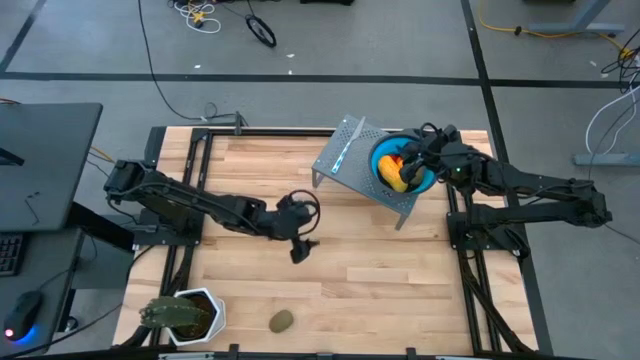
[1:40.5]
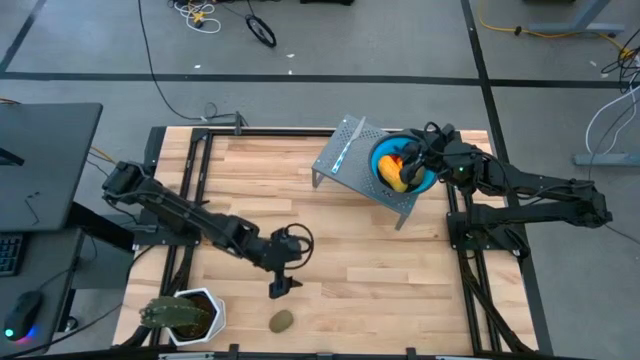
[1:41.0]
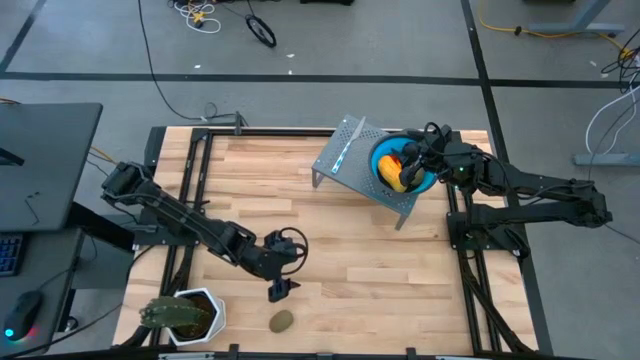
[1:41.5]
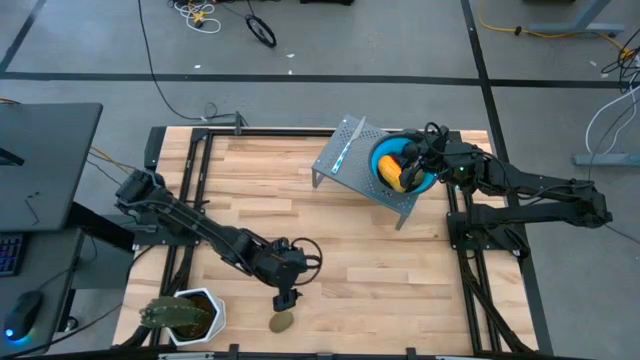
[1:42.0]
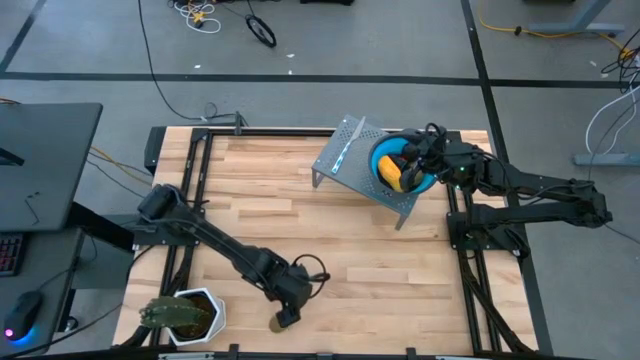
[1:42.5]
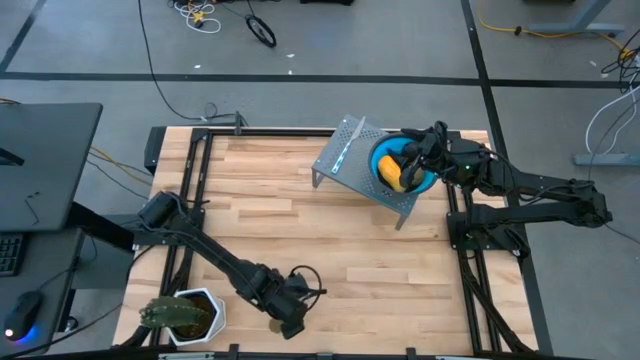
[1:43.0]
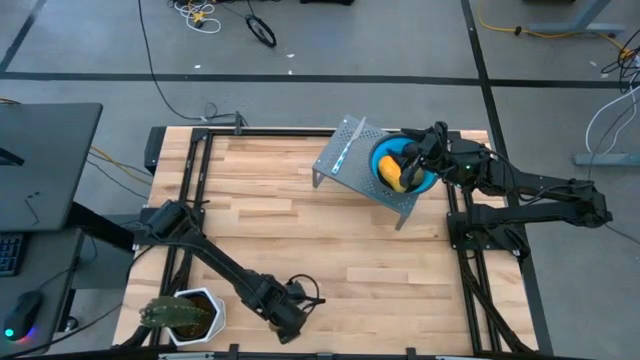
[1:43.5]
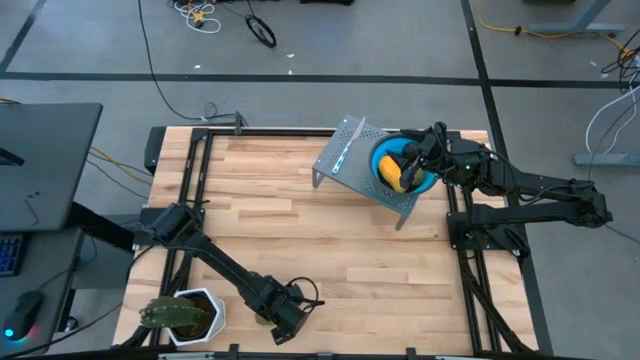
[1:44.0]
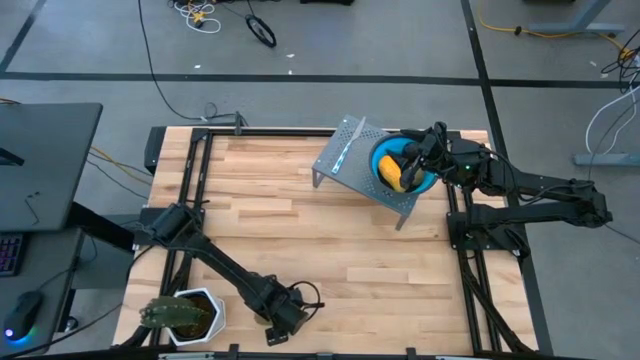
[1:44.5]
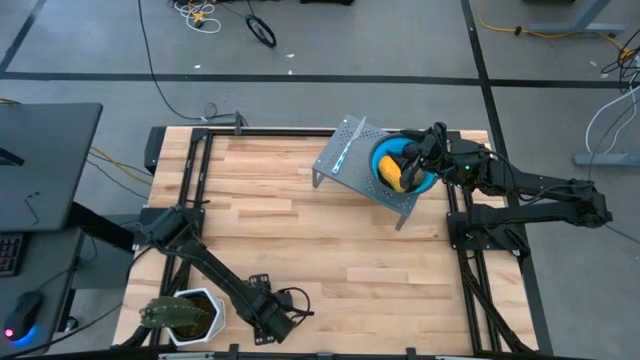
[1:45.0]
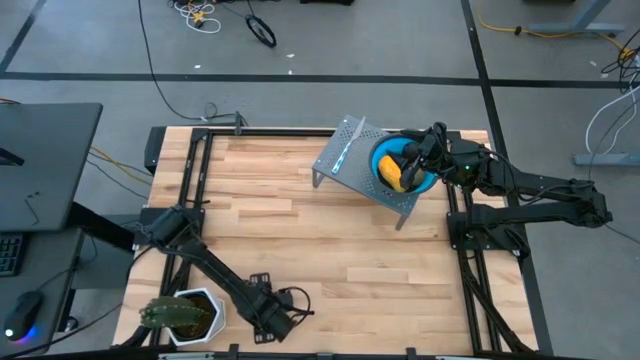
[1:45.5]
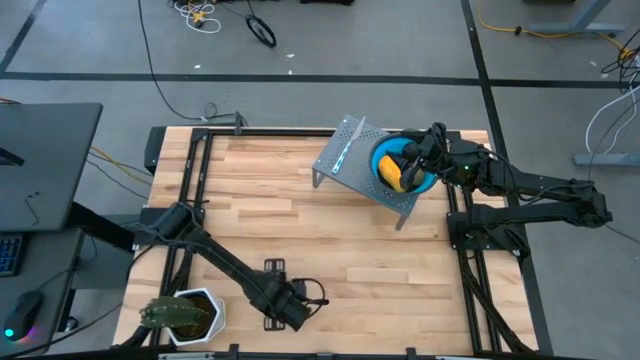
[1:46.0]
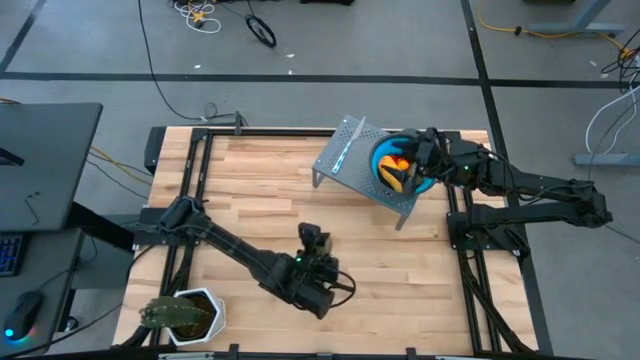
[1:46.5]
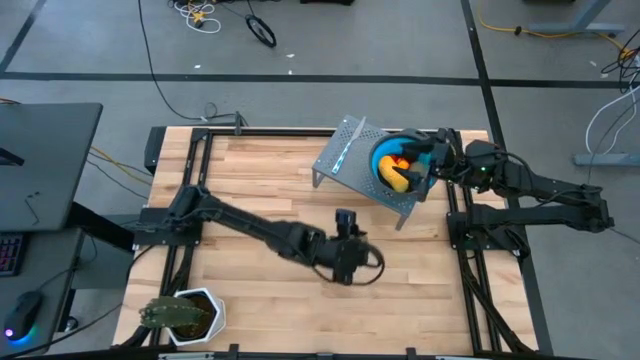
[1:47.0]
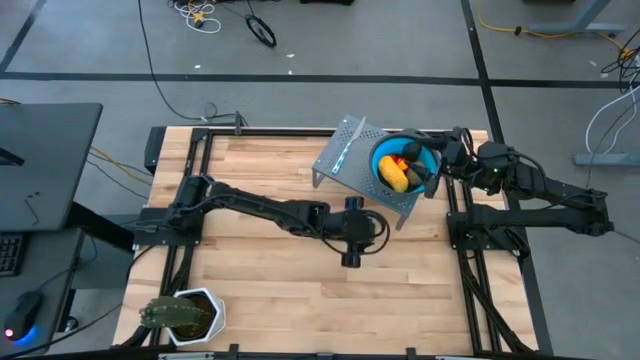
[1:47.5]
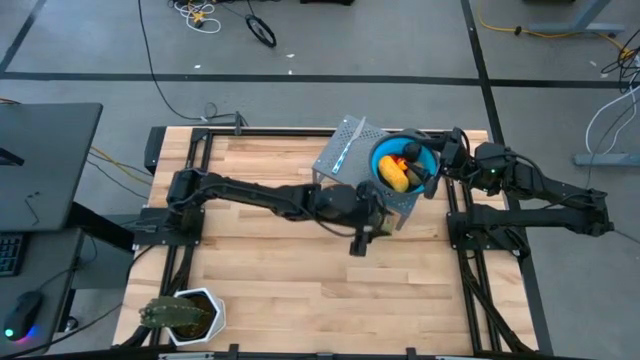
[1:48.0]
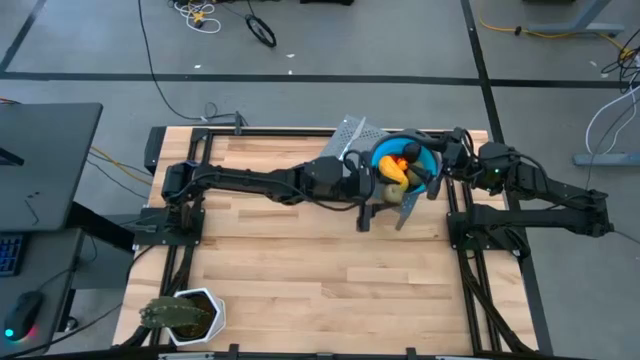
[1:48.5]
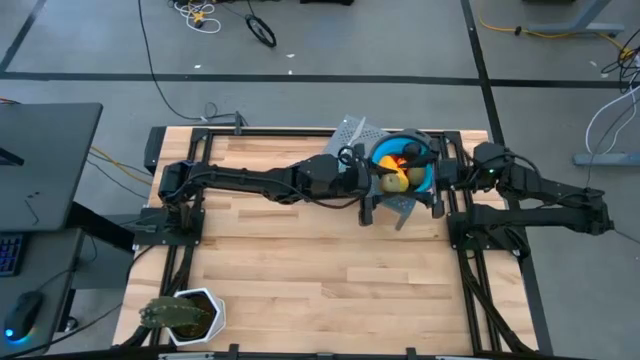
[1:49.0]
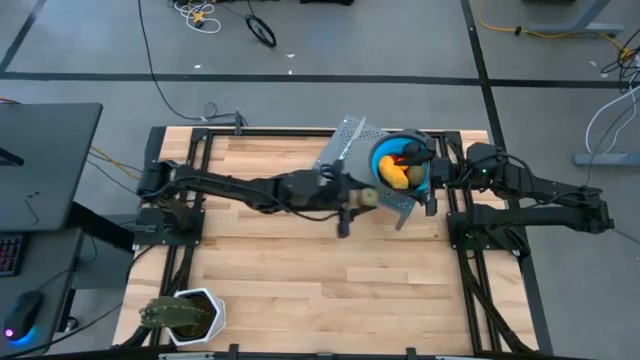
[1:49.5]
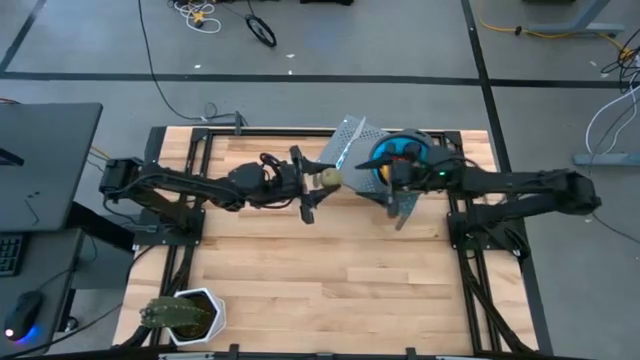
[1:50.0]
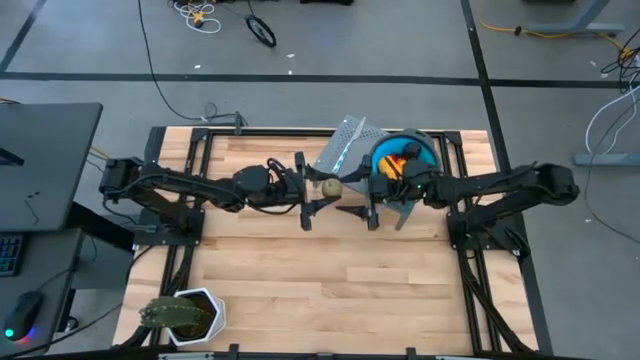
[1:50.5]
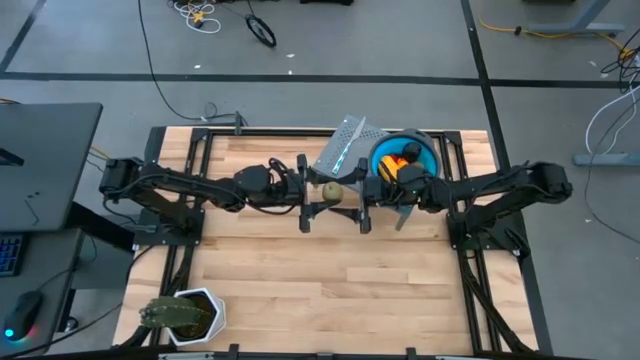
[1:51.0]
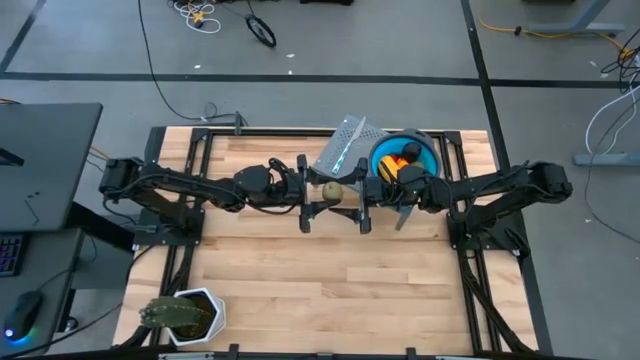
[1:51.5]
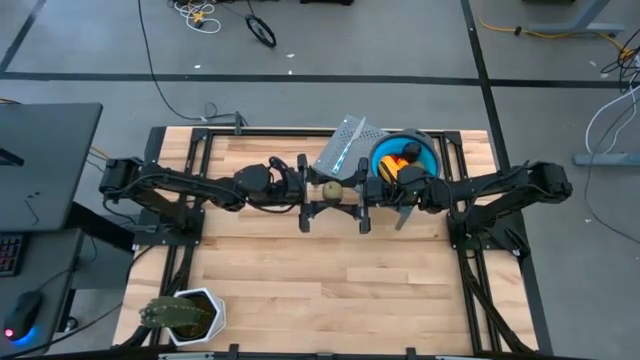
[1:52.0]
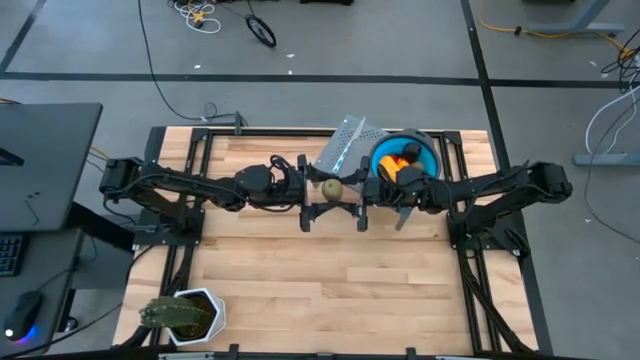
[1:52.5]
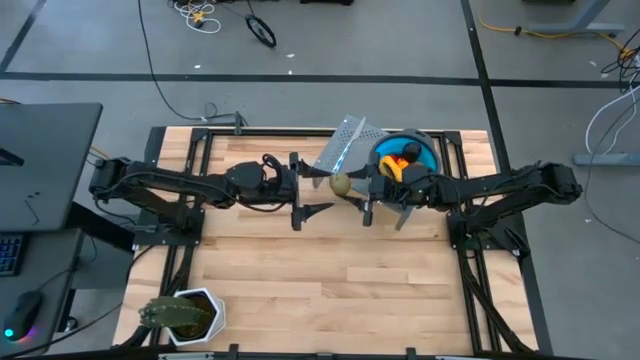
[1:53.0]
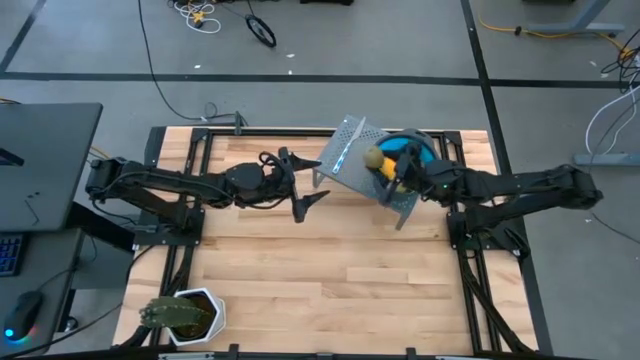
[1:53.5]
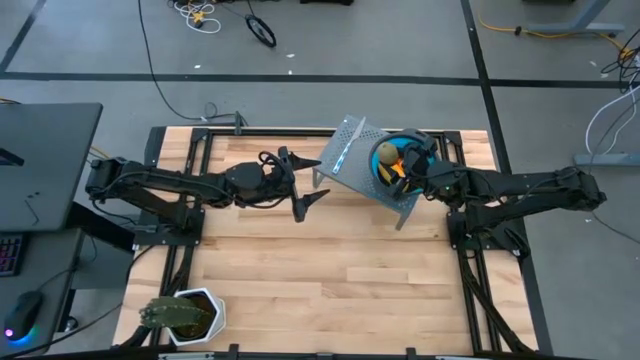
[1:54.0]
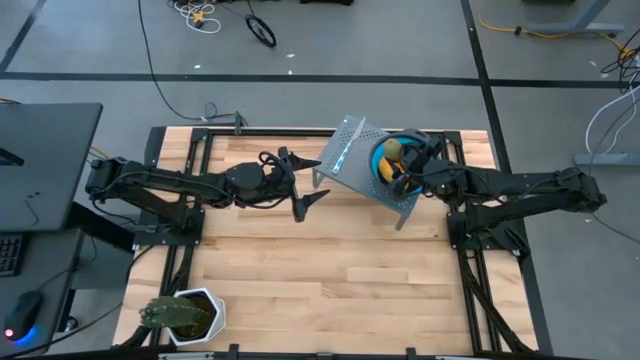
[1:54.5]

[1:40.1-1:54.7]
Task: Pick & Place Fruit
Put the brown kiwi in the blue strainer bowl on the shelf

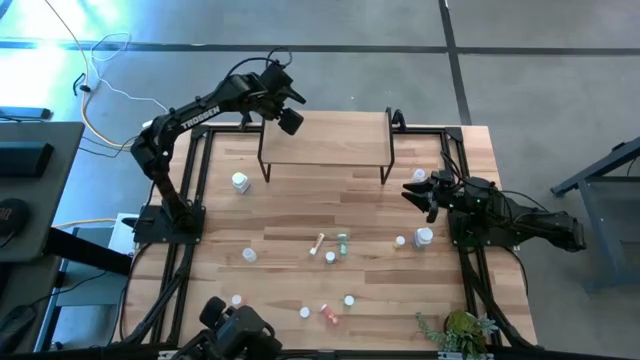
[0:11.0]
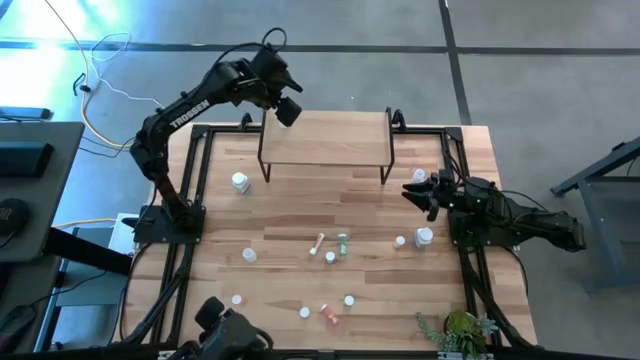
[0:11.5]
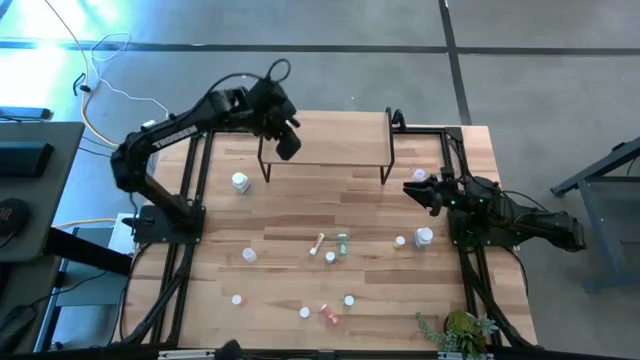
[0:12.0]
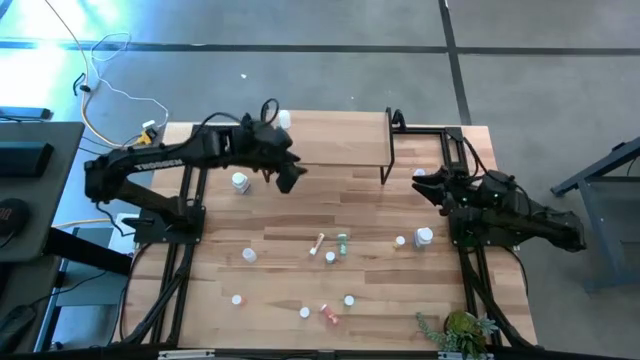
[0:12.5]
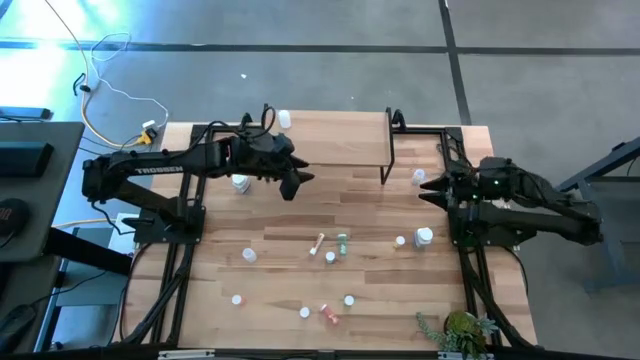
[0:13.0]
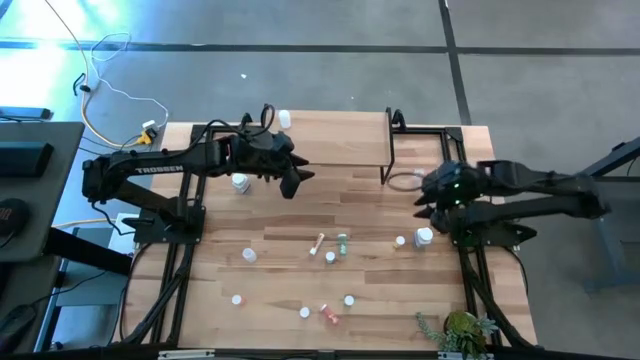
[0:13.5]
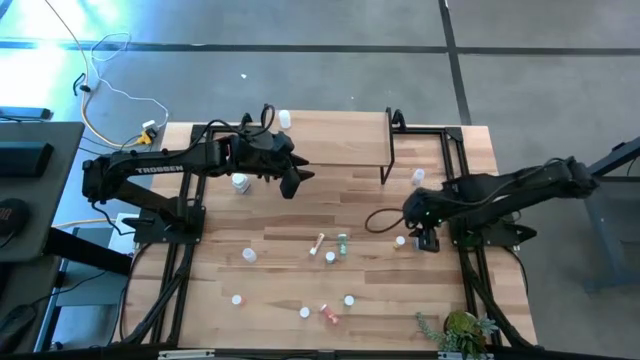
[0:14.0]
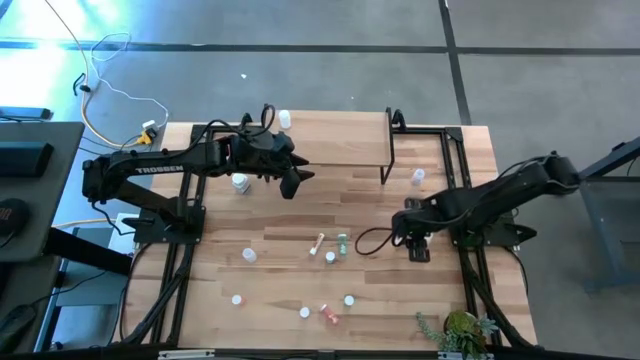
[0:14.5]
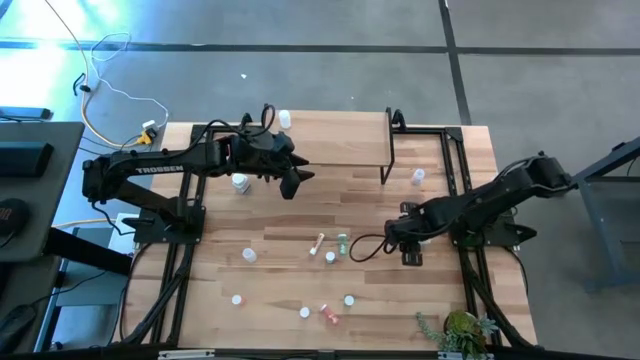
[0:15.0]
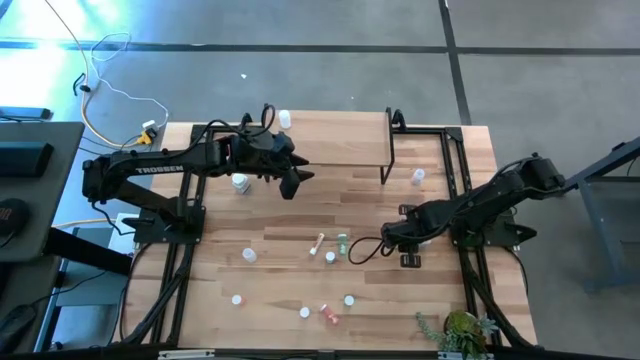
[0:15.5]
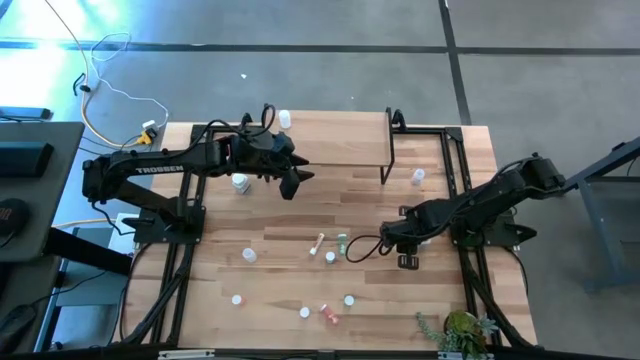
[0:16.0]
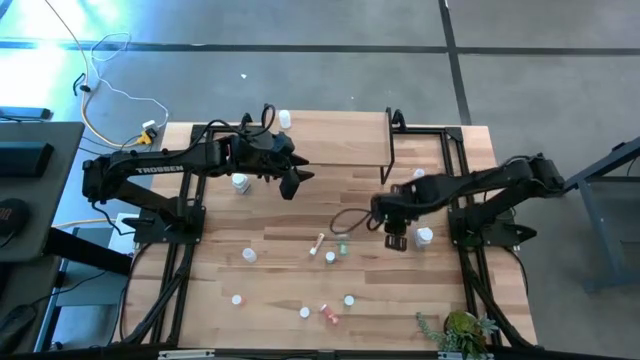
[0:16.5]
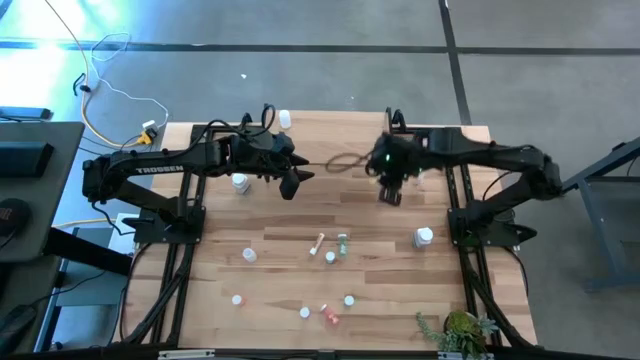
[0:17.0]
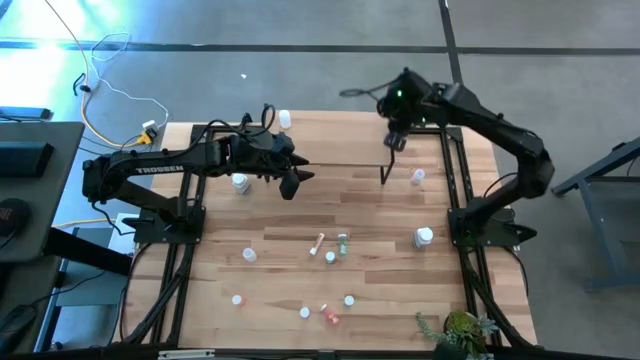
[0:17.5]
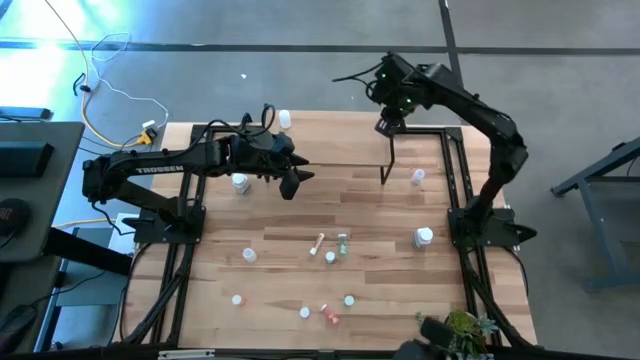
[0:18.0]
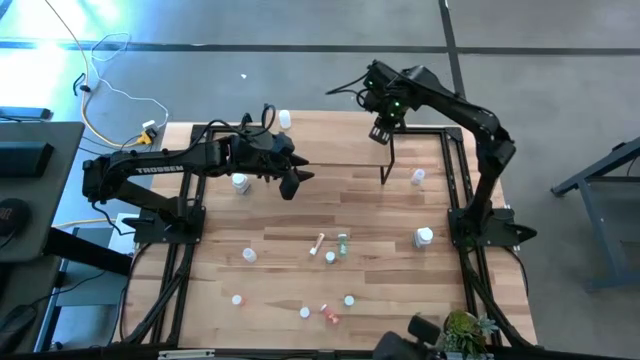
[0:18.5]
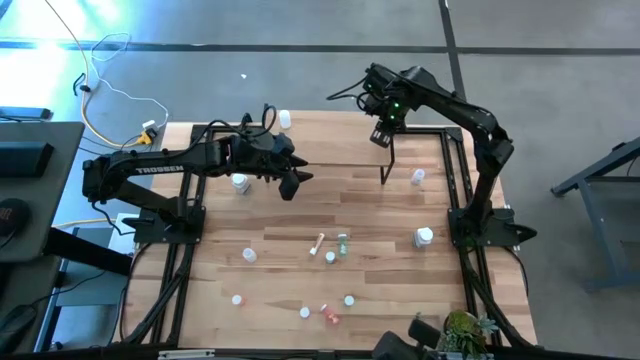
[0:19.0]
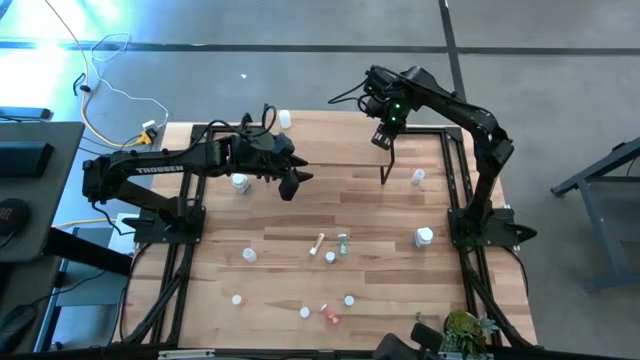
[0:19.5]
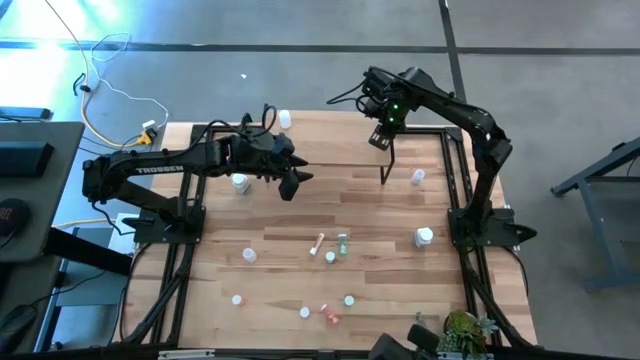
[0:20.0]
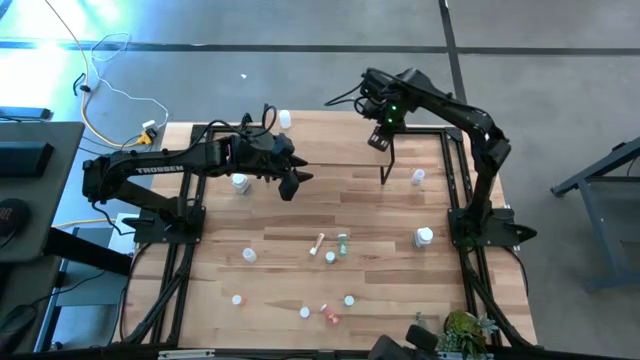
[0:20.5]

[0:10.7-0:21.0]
Task: Pick and place medicine bottles onto shelf by color
Put the light yellow pill bottle on the shelf
